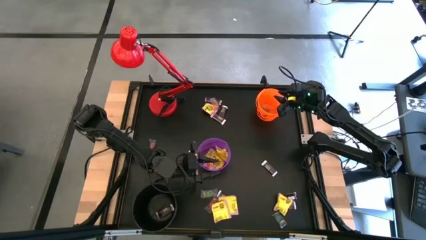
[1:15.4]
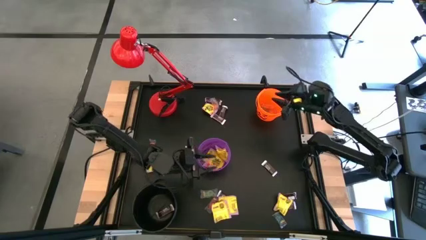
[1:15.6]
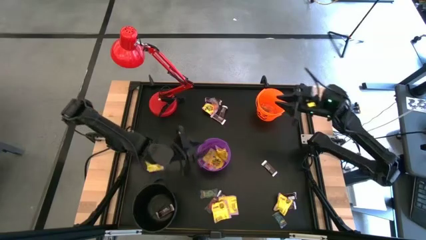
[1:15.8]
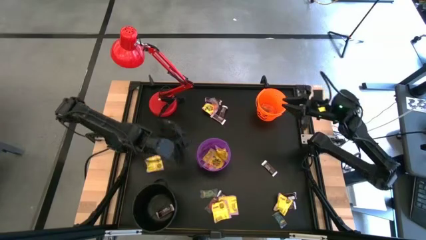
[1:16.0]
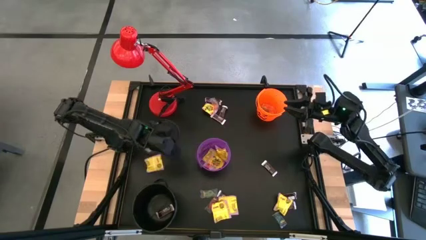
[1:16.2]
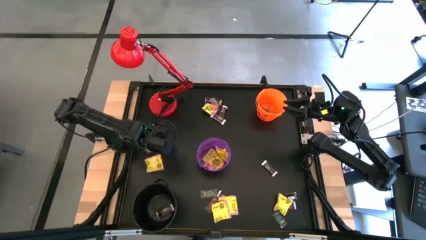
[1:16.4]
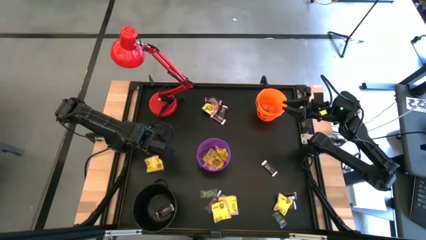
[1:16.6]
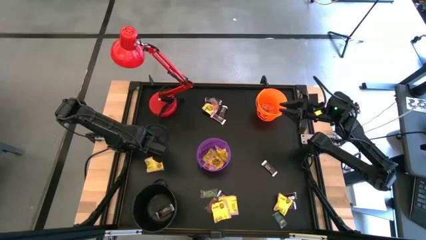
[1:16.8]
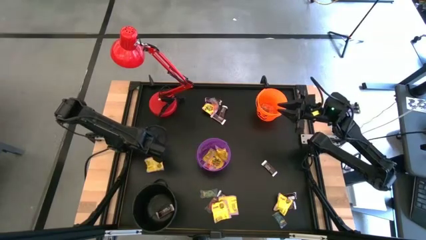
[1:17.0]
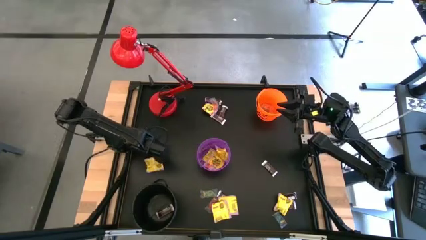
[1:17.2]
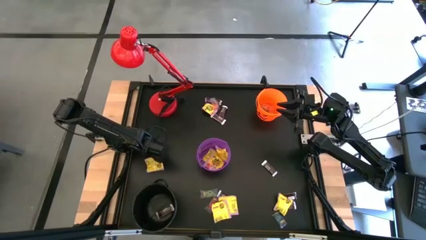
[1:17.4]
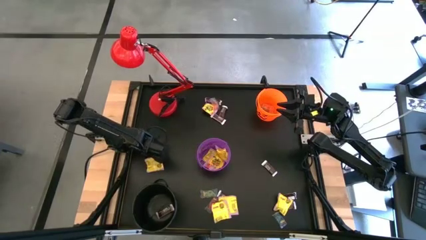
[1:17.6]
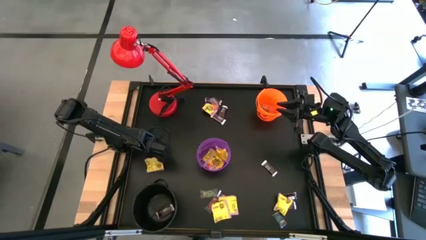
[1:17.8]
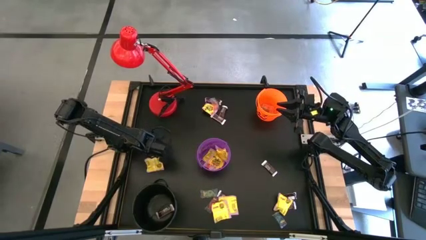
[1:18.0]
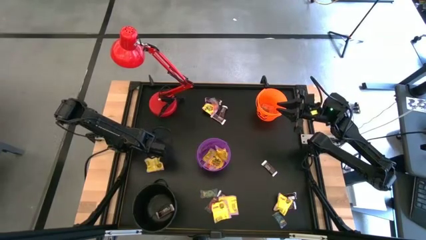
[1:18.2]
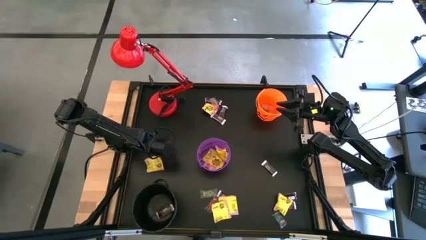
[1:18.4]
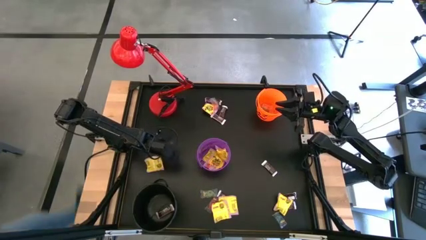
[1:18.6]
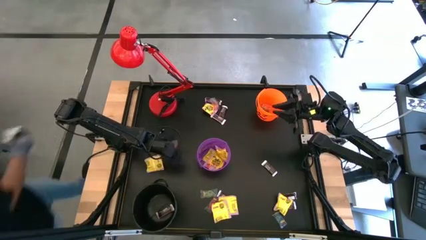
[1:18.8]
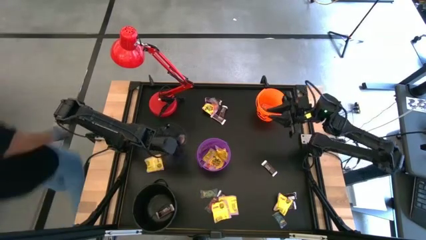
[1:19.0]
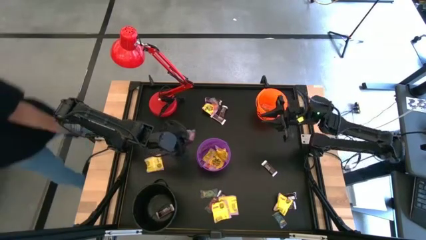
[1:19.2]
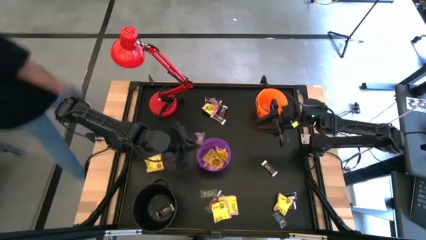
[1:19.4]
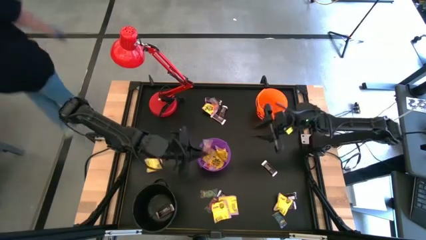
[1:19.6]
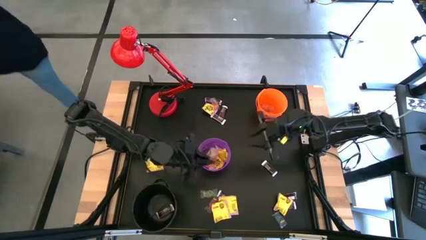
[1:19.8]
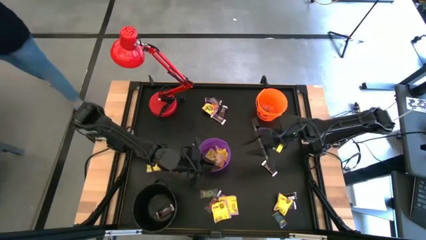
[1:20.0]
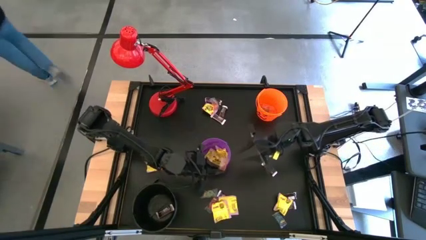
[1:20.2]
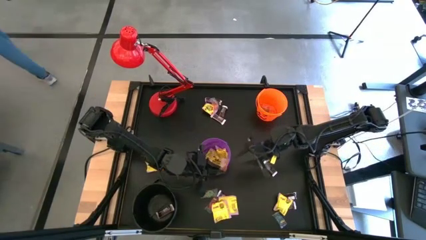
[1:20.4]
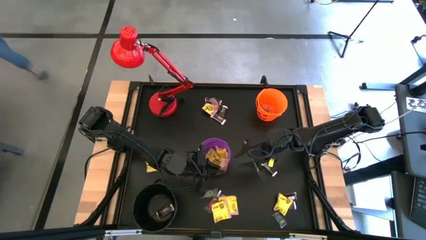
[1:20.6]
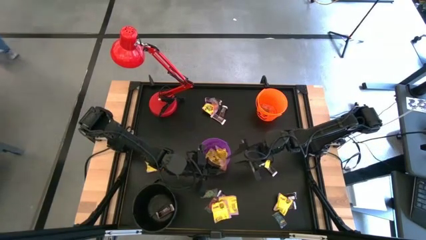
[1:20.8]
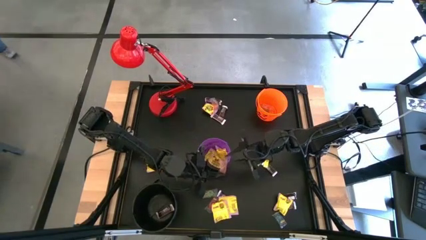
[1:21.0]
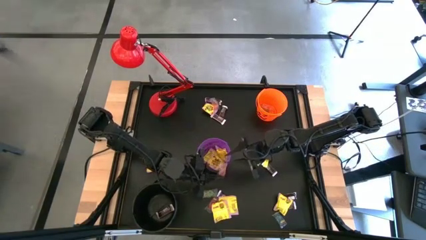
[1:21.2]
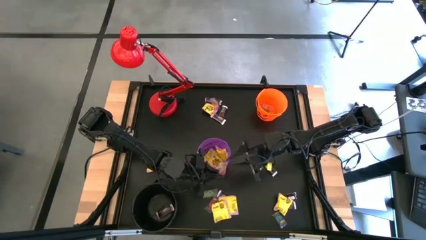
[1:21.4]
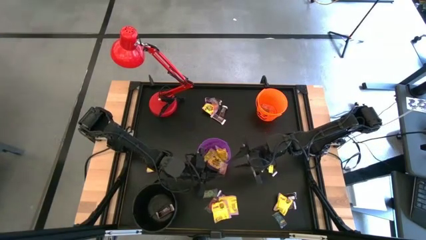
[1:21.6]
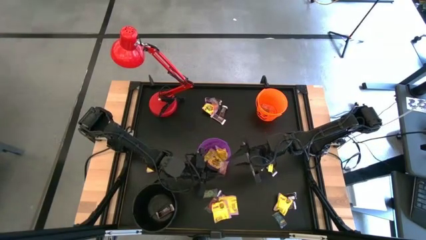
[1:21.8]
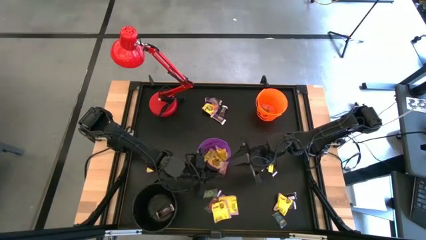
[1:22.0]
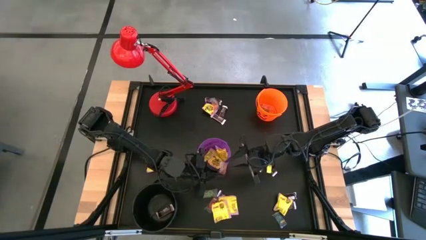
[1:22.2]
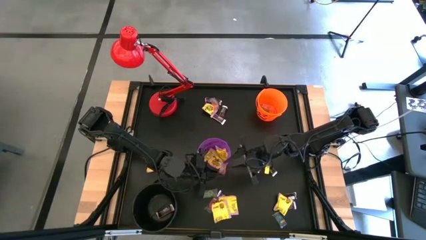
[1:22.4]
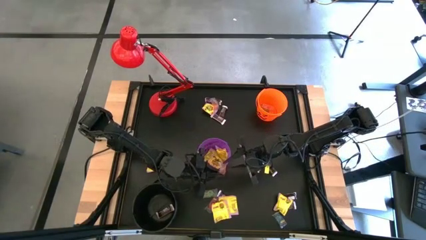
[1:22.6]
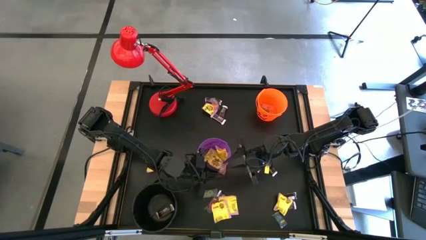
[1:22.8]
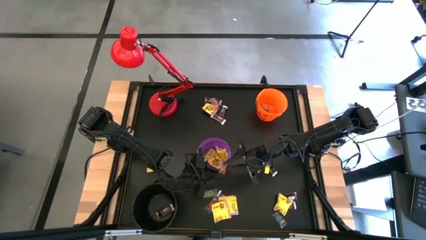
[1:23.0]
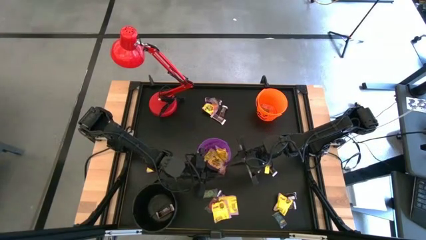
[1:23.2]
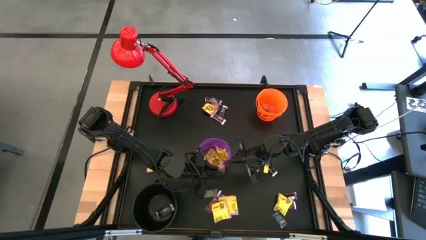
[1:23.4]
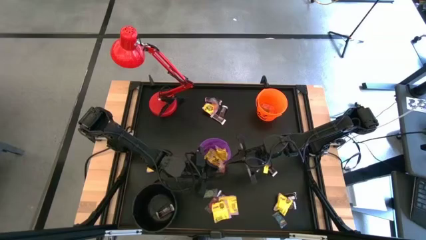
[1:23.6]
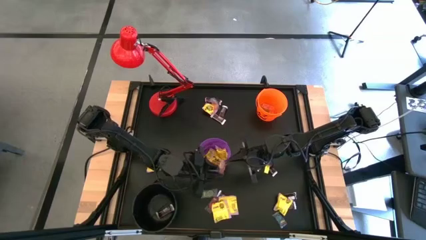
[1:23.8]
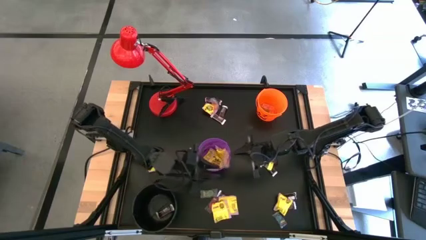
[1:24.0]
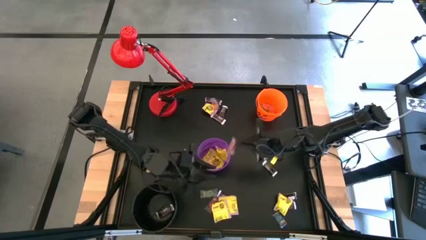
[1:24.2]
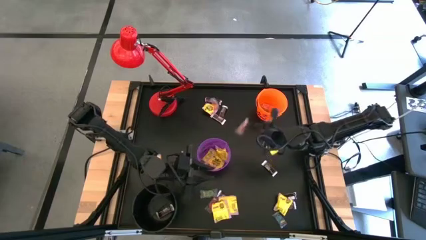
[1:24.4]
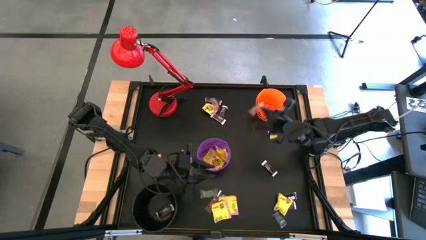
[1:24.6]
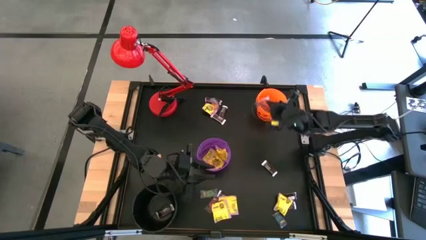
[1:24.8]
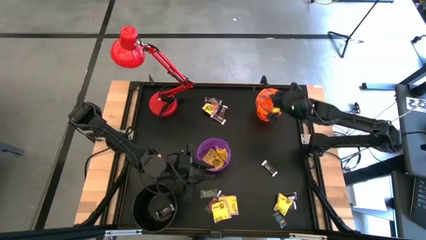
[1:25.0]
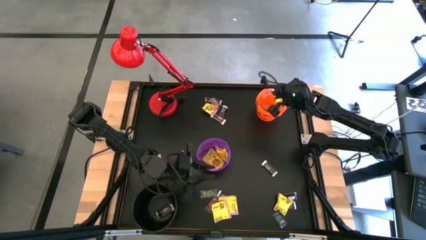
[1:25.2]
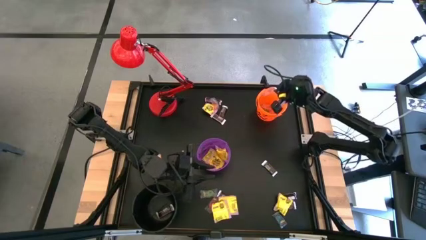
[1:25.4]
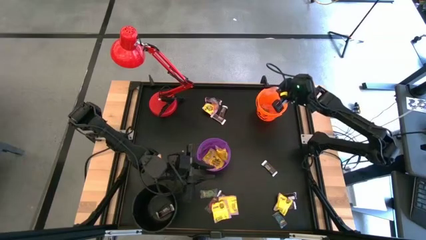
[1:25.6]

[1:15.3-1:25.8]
Task: Sort candy
Put the orange gummy into the orange bucket

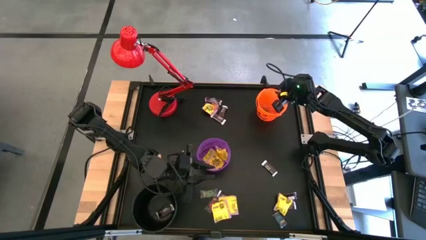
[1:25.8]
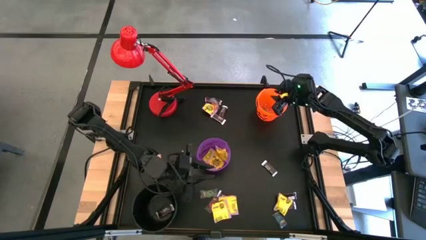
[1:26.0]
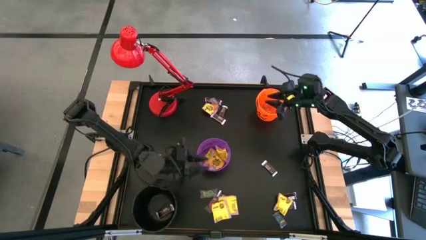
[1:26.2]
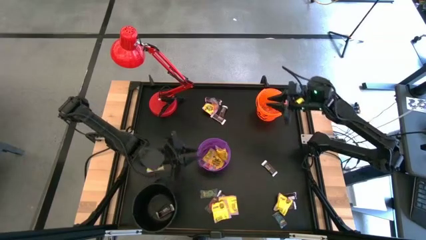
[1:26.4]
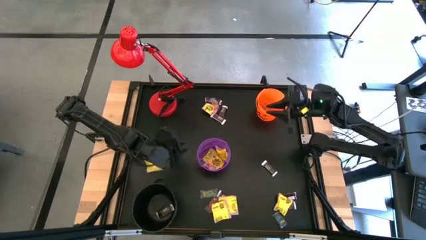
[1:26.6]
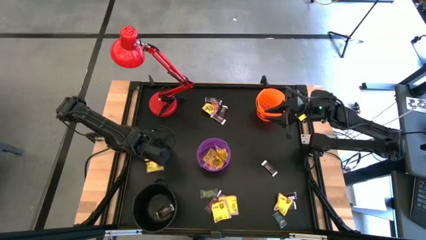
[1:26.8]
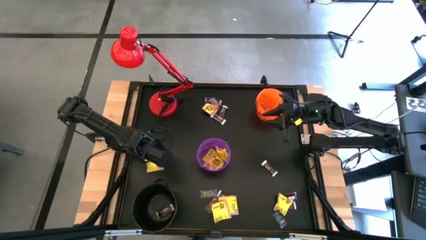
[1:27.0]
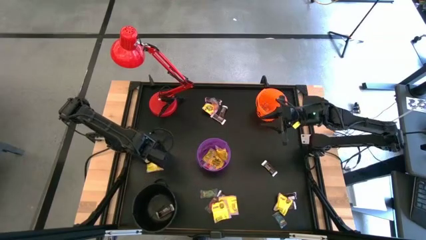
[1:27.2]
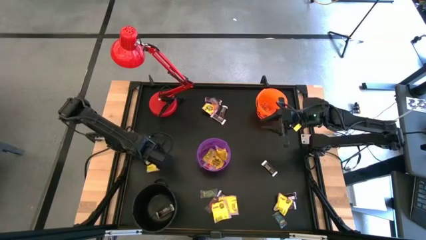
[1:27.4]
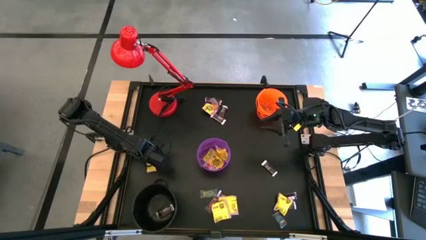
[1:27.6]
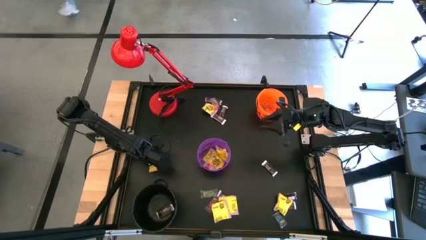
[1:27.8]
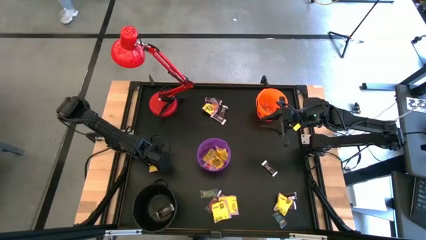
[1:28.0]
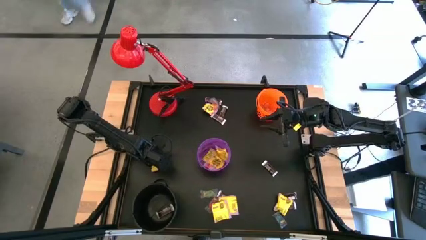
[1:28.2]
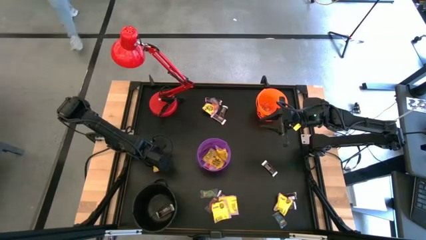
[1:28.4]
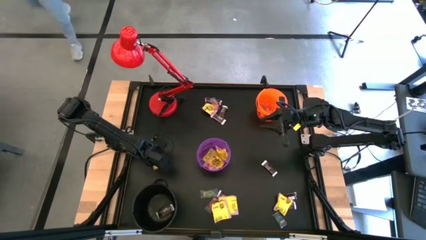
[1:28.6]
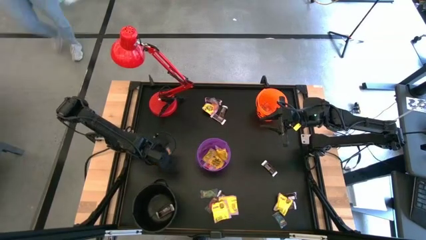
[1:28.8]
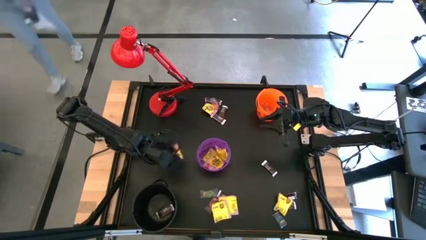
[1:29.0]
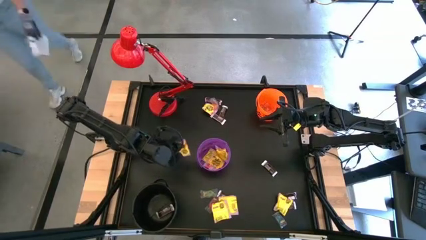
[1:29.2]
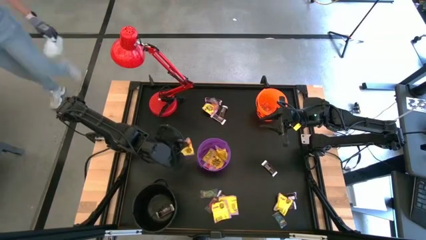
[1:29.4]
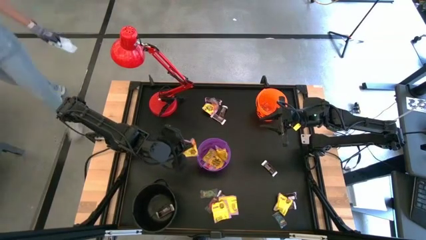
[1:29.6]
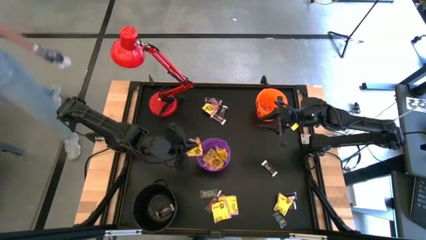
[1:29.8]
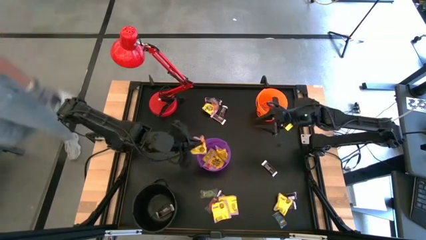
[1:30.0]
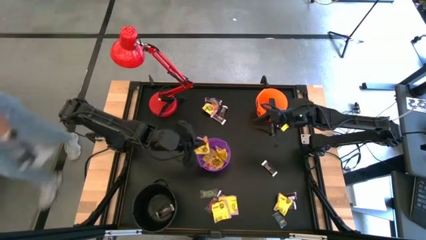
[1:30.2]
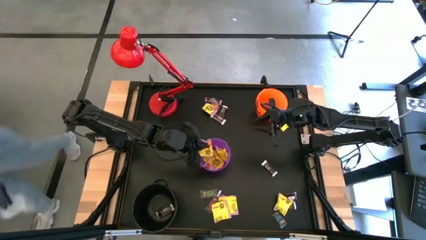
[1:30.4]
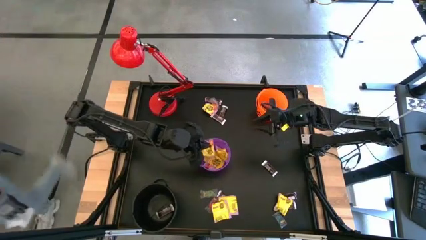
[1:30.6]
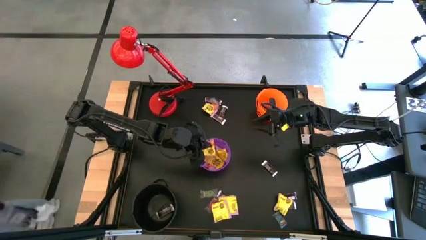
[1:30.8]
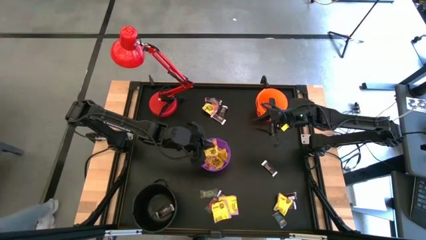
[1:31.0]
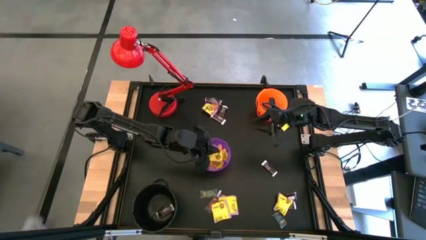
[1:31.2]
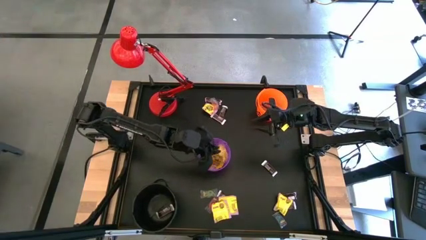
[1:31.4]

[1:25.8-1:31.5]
Put the yellow candy into the purple bucket
